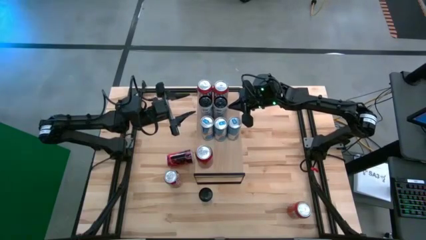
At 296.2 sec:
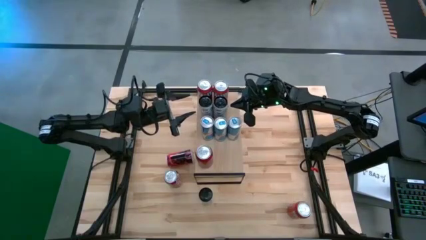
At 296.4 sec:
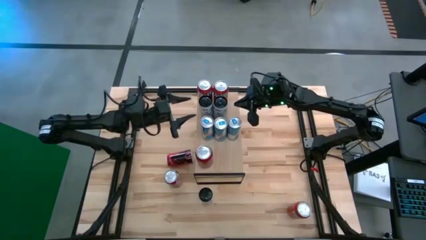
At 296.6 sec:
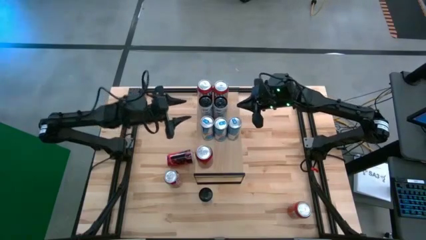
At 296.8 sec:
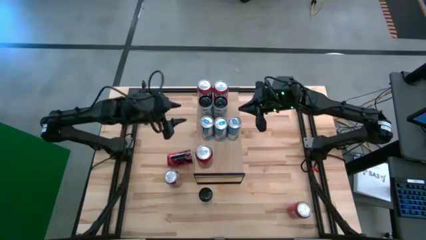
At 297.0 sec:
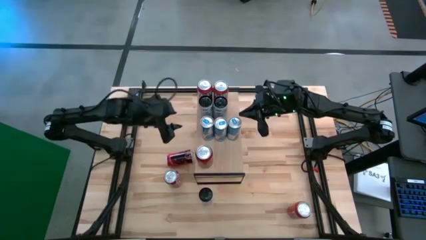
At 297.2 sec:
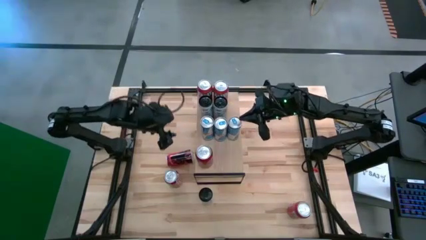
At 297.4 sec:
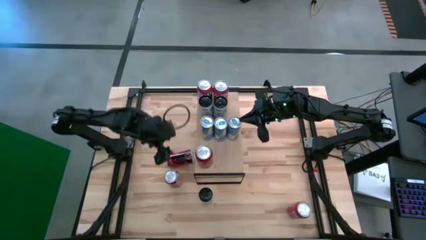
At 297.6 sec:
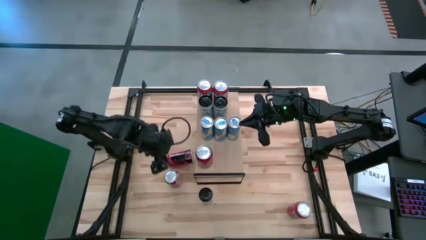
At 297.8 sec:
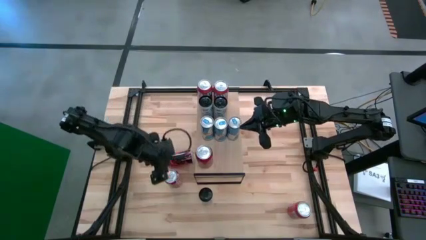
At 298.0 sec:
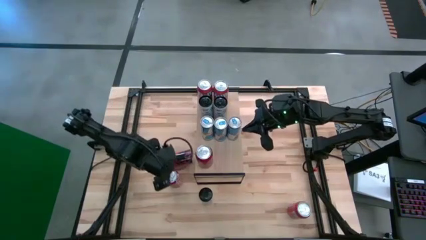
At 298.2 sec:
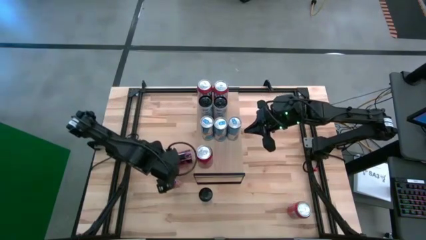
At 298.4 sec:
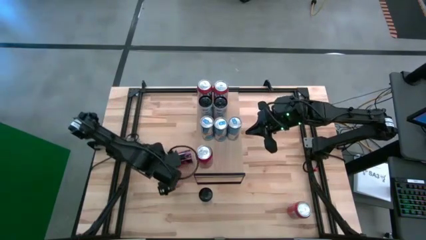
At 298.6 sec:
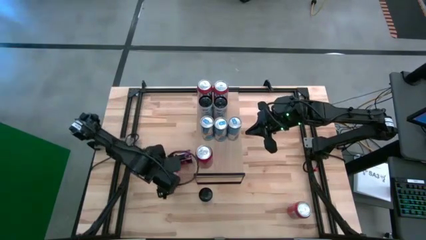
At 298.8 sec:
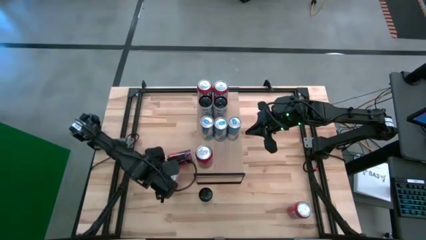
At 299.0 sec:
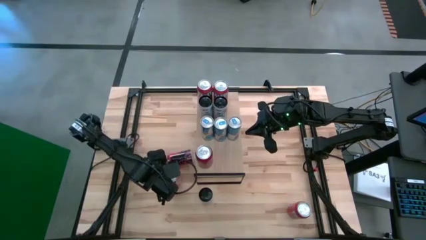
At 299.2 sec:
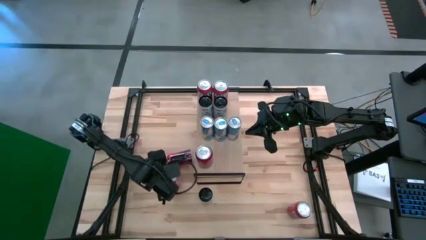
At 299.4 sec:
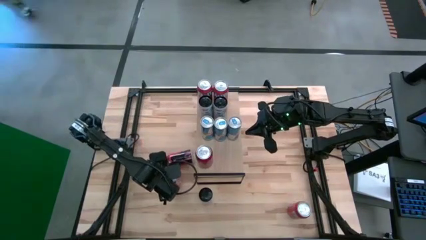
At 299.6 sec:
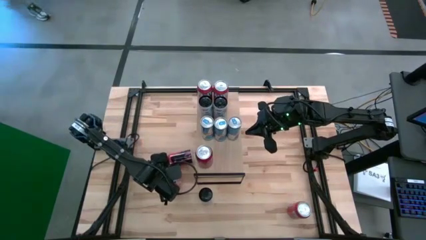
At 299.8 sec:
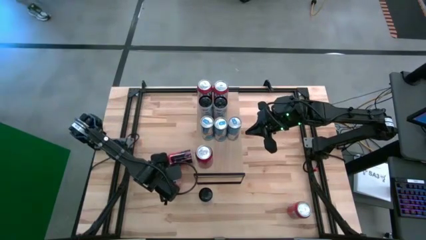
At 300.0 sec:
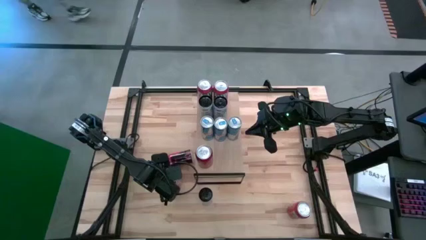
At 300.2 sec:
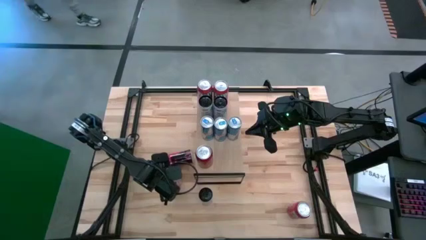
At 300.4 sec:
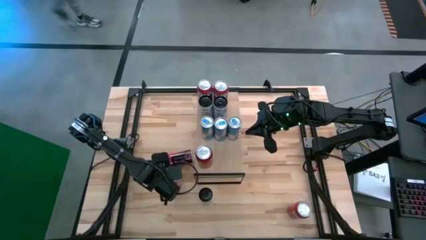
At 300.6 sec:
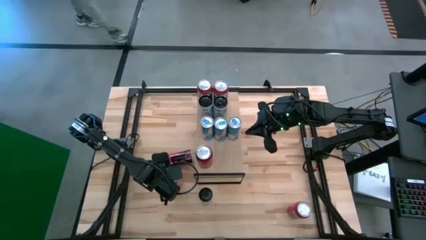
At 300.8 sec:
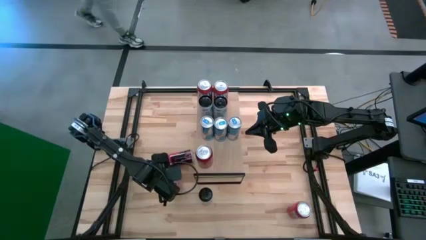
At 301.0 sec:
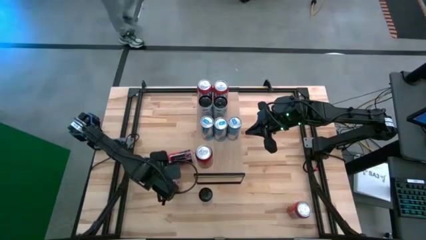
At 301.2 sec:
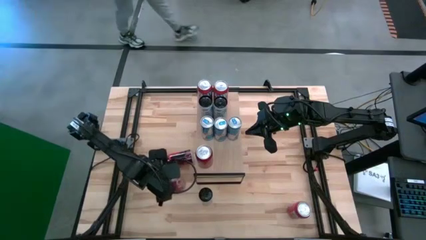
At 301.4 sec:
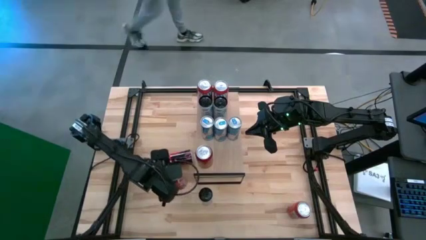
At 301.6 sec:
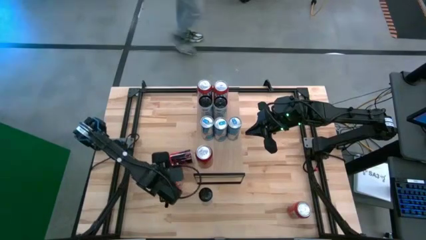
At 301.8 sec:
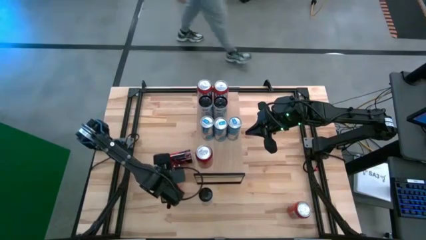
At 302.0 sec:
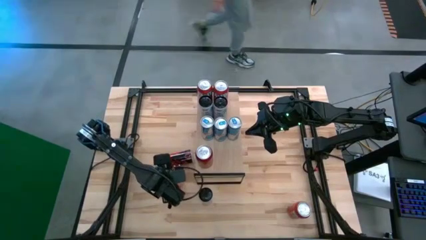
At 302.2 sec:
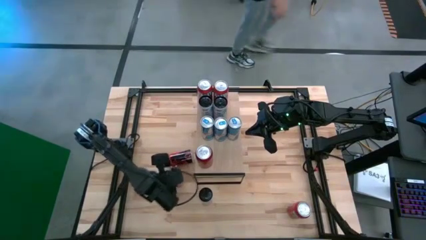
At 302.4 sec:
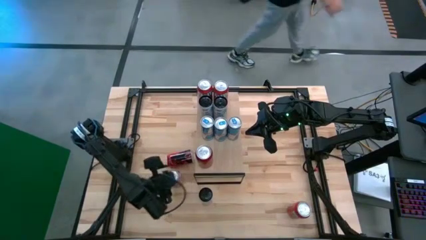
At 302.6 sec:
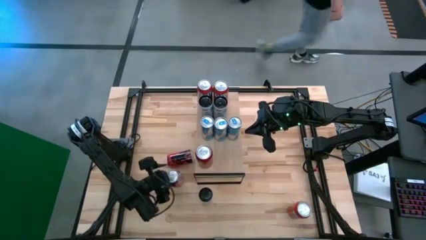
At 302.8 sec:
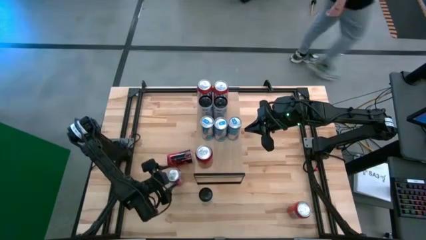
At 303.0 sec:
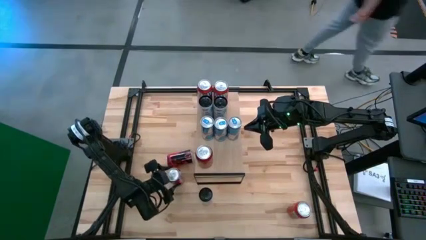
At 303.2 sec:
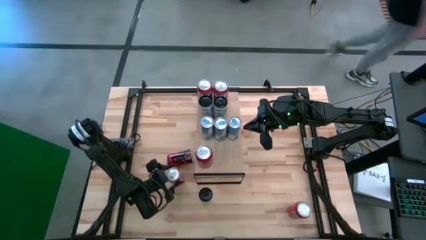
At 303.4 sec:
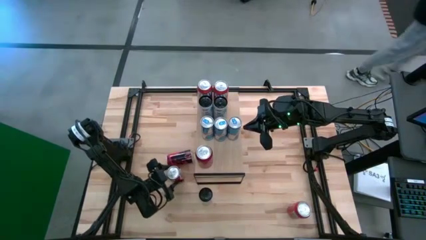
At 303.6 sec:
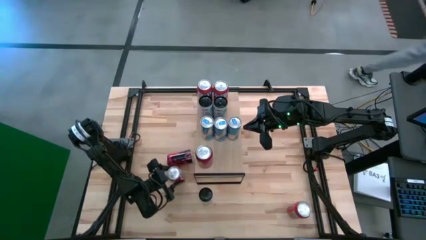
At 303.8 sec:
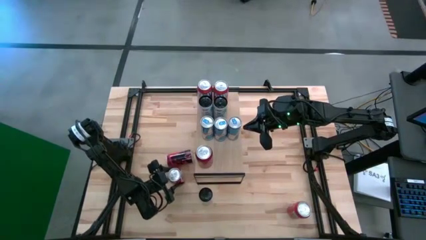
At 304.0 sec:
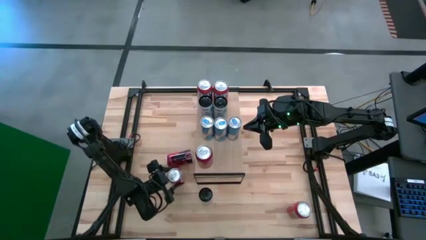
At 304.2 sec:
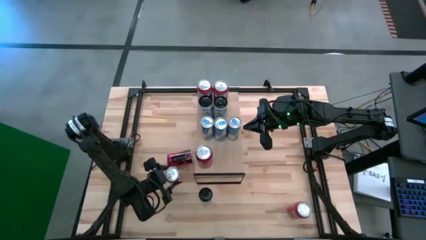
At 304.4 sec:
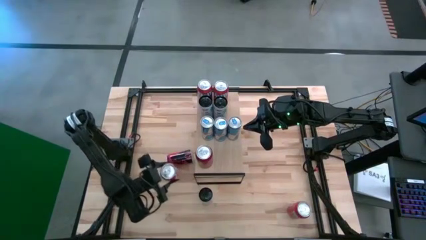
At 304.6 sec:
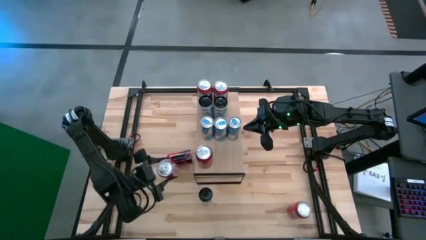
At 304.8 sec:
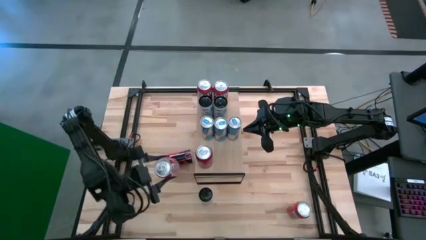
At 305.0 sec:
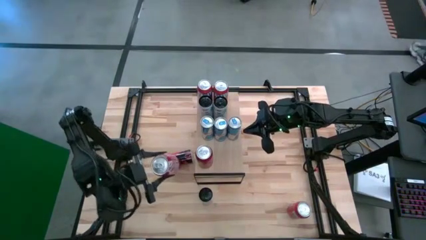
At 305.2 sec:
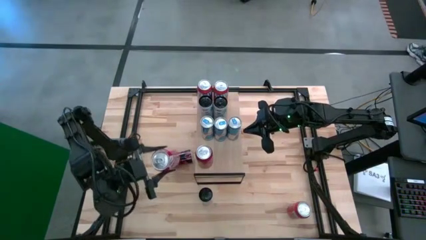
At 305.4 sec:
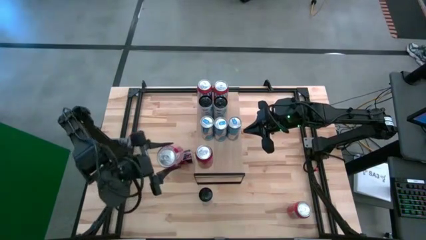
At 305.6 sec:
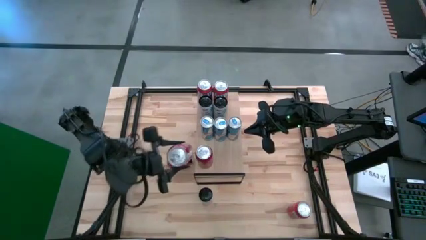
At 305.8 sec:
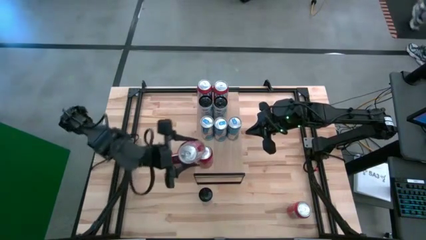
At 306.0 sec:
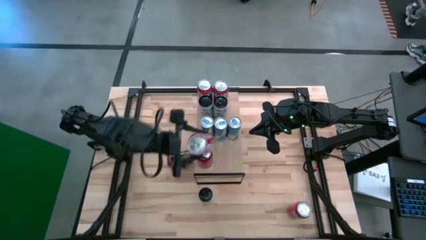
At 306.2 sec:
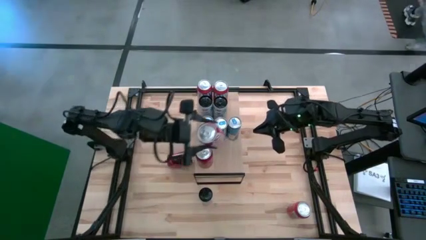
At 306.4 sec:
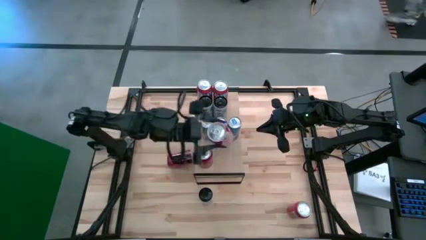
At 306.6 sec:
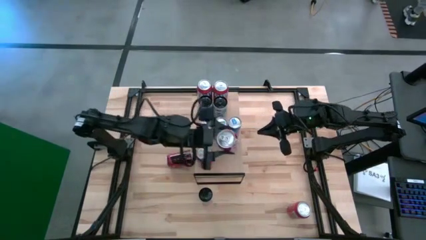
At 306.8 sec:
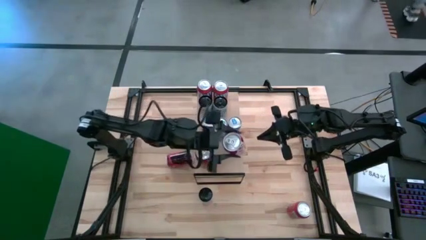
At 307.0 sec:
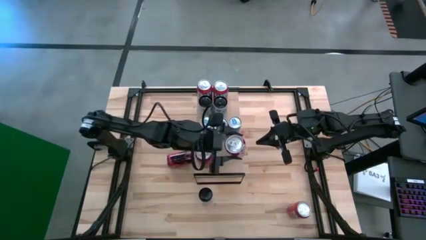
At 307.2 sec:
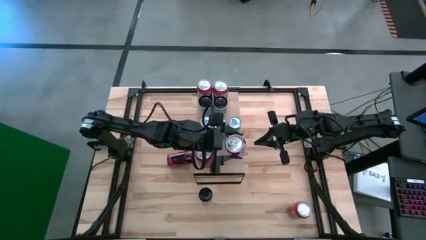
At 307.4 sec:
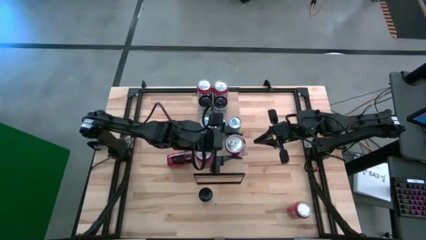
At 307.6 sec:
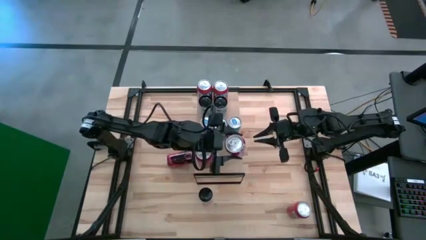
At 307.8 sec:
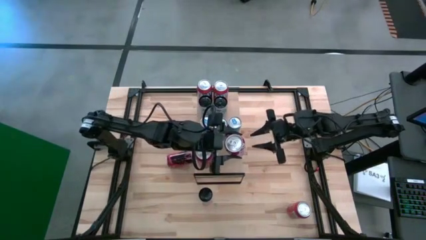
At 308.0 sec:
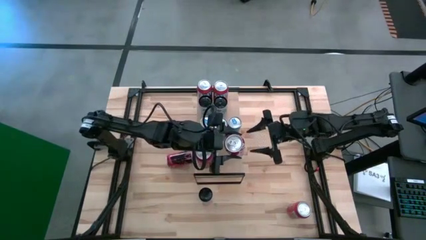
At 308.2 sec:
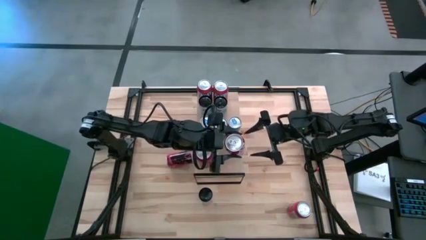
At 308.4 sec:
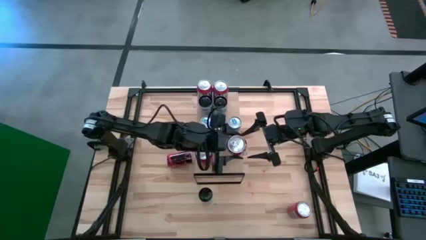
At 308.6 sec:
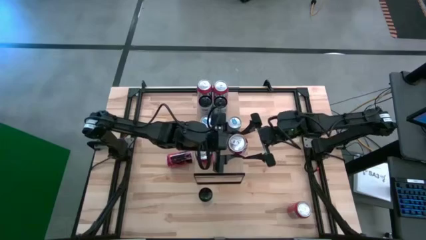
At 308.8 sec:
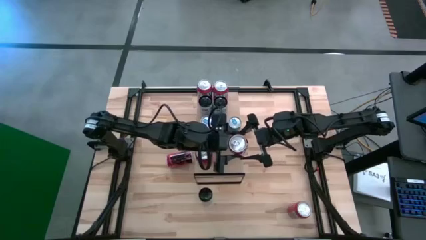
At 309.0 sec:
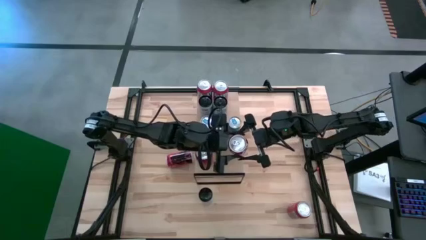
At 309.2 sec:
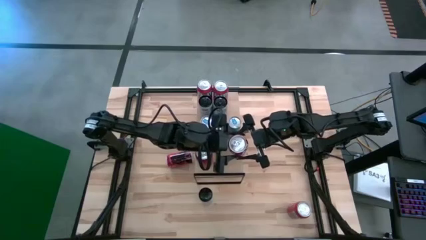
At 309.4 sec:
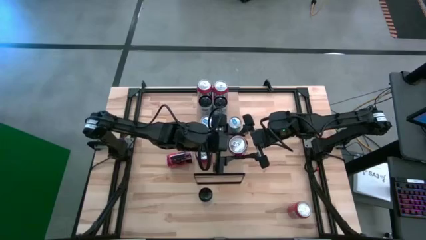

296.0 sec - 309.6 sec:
Task: Place canned beverage on shelf
Put the red white soda can on the shelf
